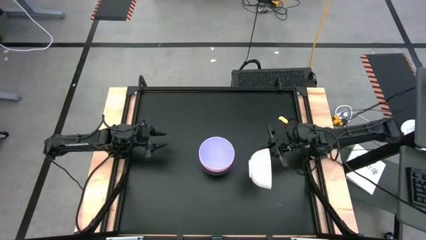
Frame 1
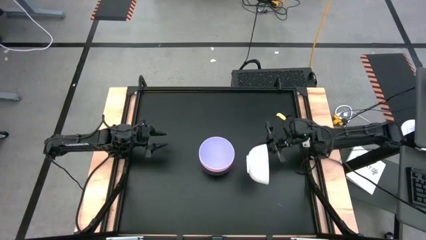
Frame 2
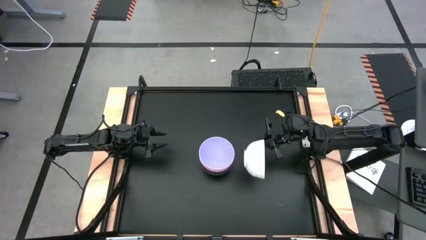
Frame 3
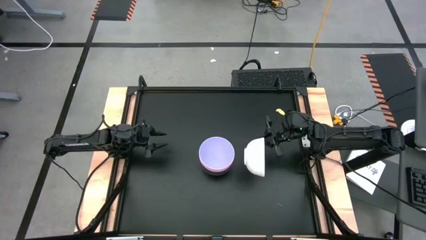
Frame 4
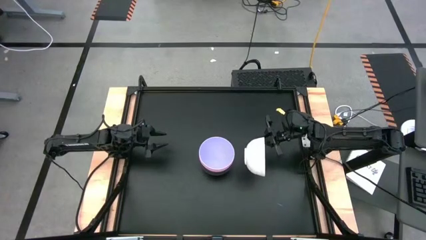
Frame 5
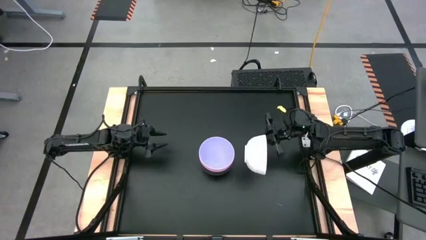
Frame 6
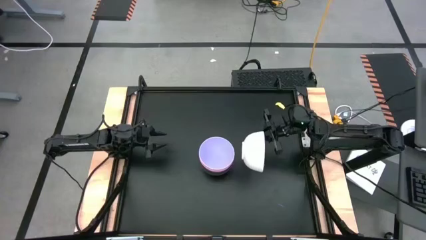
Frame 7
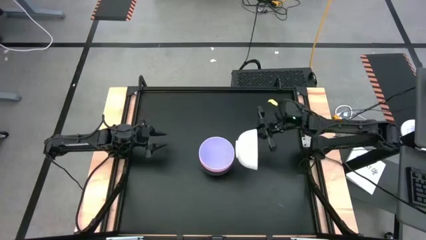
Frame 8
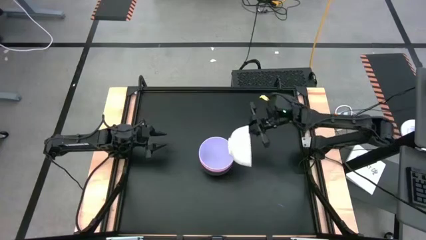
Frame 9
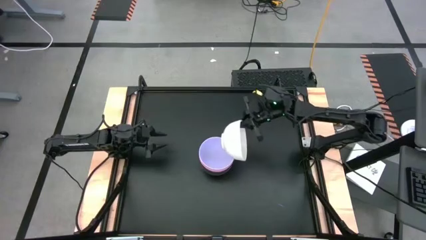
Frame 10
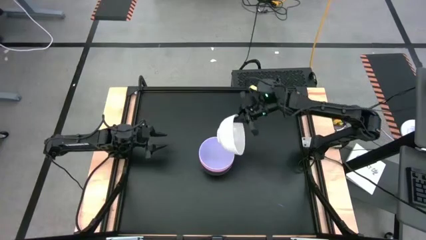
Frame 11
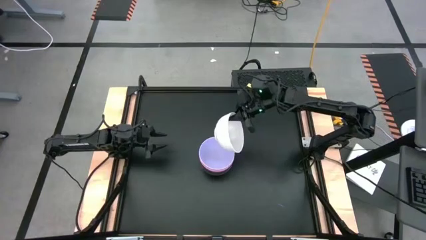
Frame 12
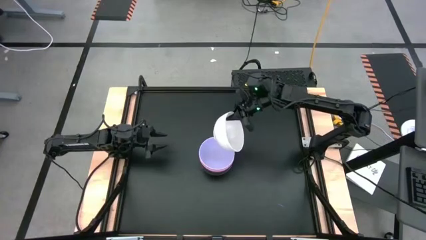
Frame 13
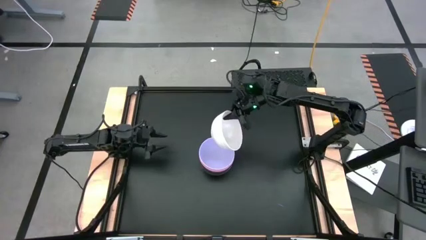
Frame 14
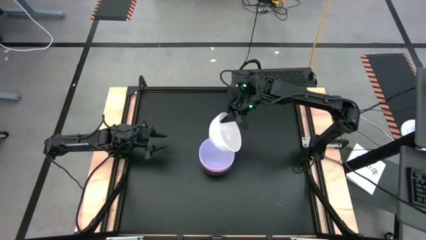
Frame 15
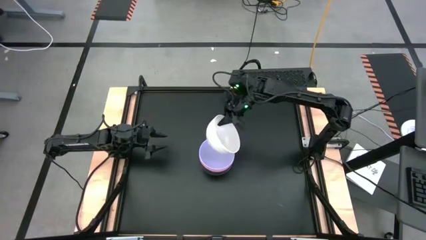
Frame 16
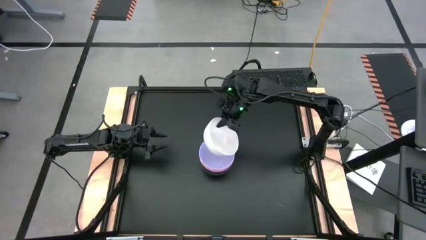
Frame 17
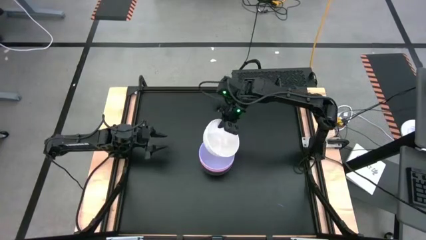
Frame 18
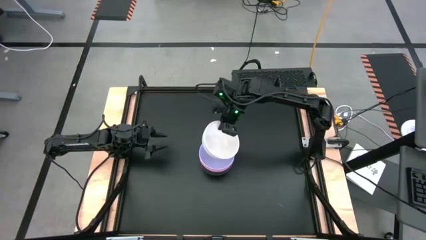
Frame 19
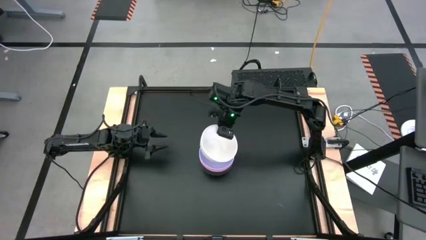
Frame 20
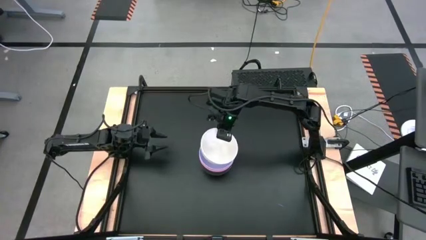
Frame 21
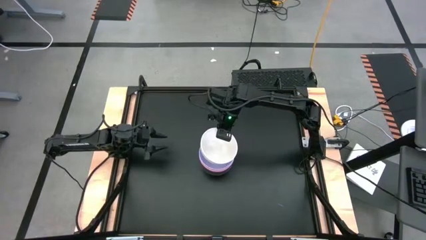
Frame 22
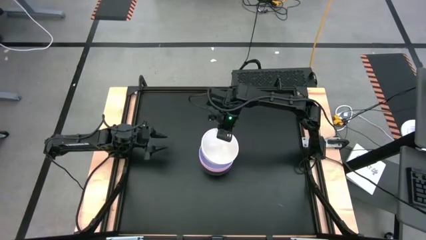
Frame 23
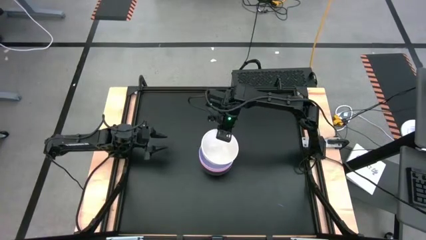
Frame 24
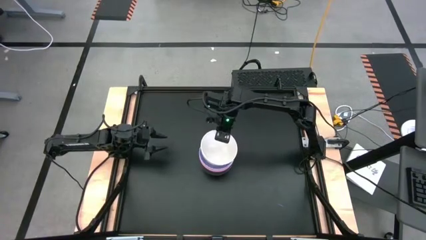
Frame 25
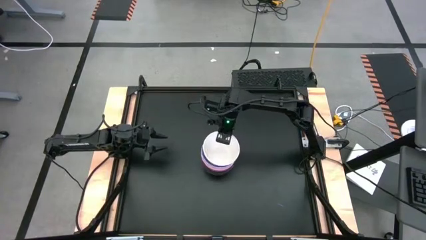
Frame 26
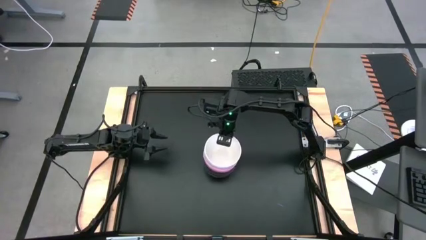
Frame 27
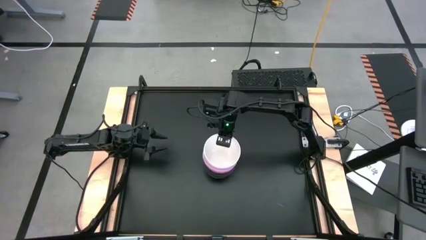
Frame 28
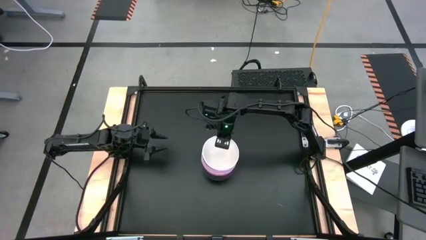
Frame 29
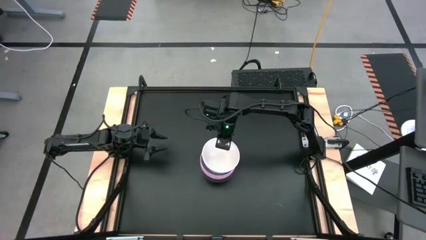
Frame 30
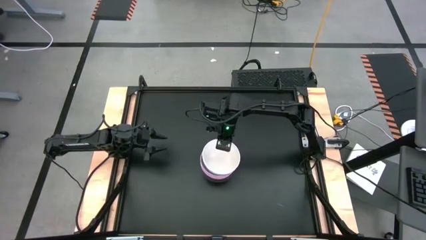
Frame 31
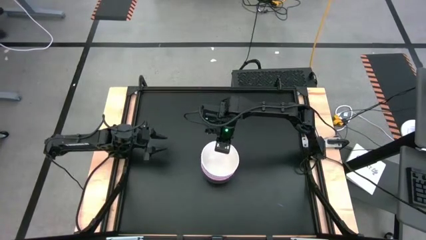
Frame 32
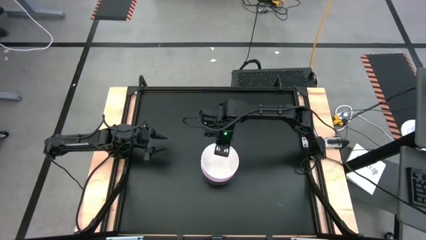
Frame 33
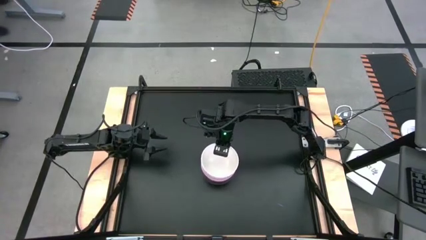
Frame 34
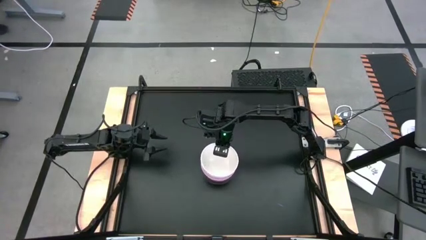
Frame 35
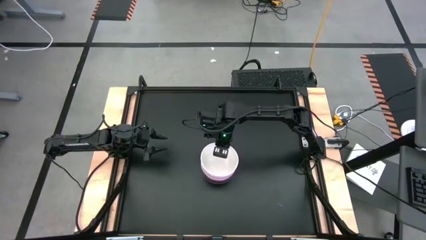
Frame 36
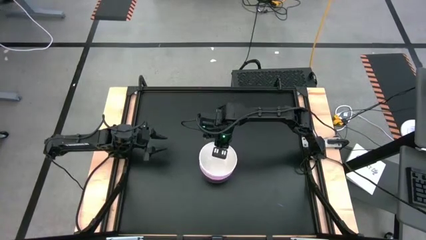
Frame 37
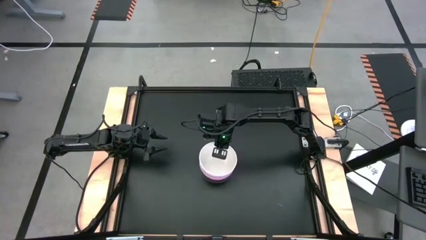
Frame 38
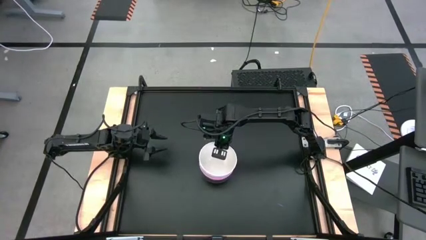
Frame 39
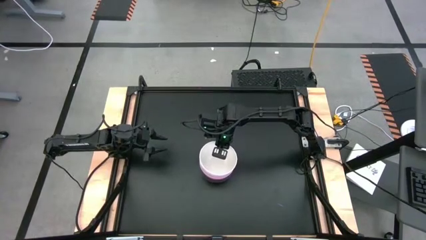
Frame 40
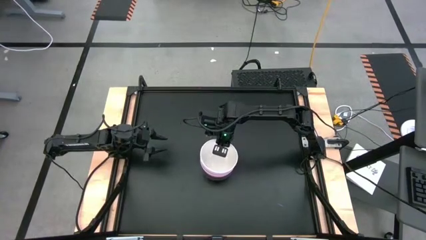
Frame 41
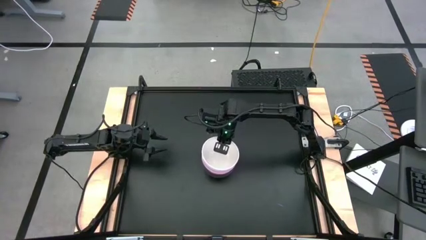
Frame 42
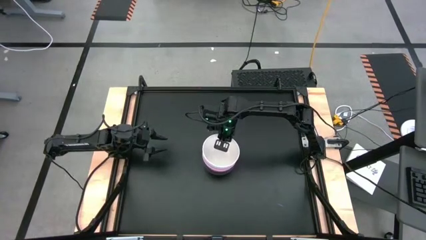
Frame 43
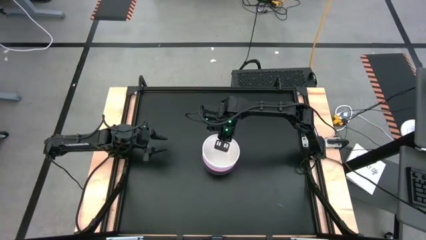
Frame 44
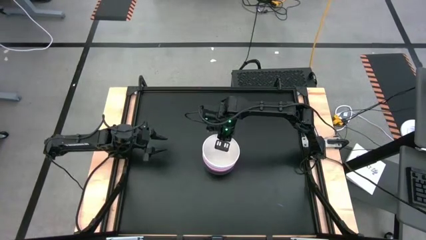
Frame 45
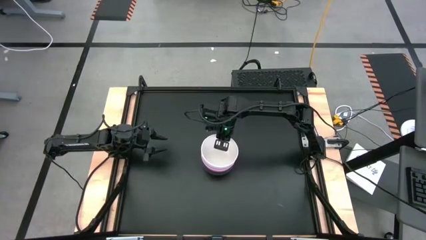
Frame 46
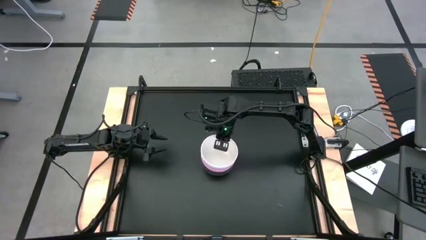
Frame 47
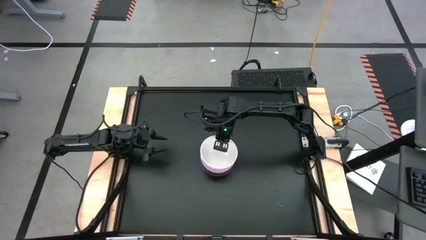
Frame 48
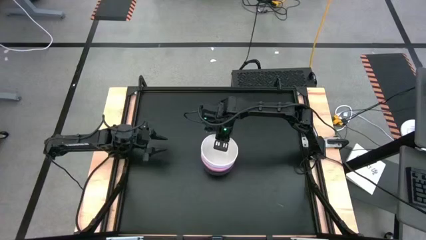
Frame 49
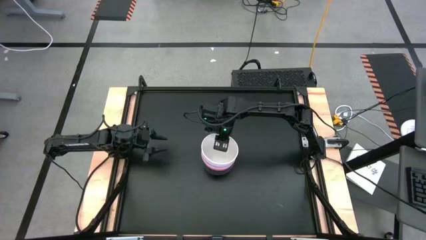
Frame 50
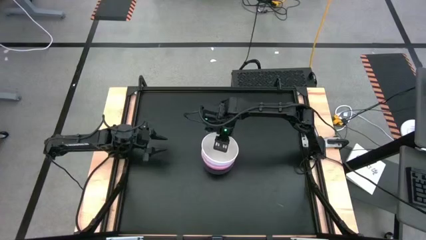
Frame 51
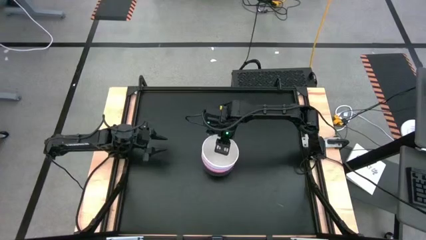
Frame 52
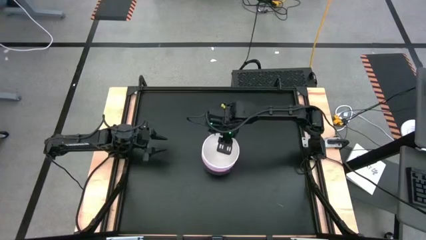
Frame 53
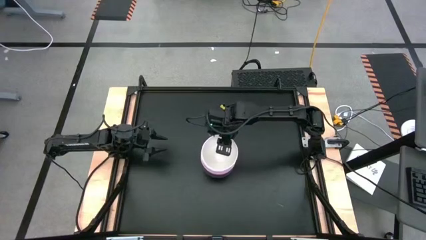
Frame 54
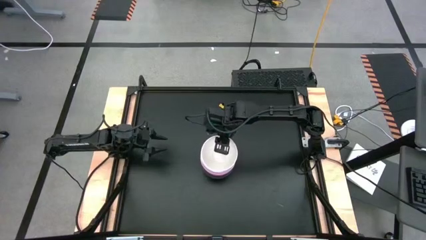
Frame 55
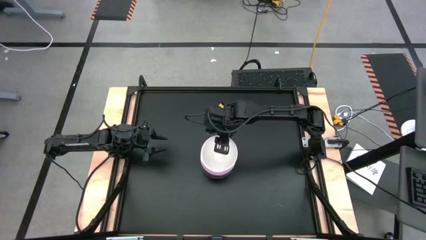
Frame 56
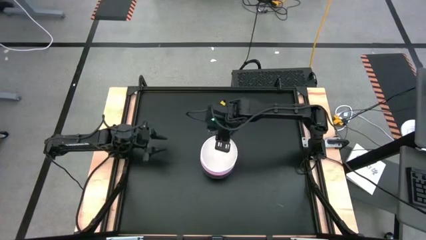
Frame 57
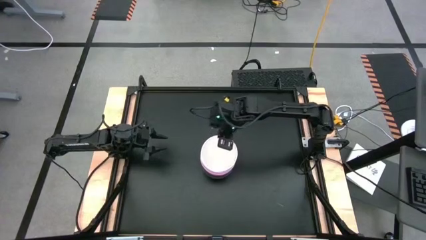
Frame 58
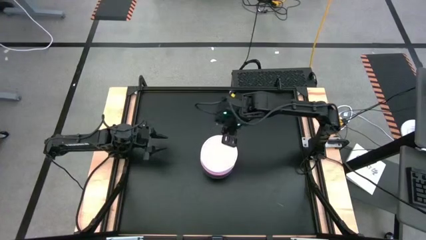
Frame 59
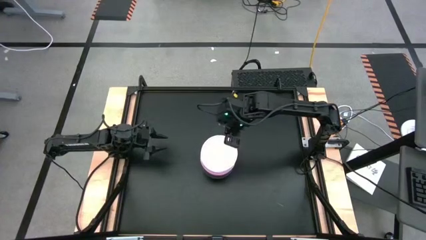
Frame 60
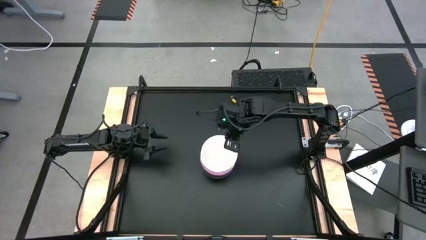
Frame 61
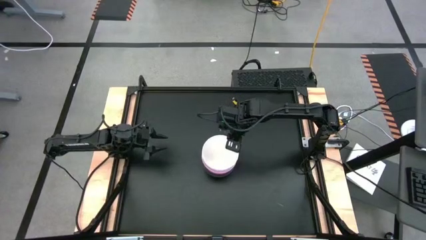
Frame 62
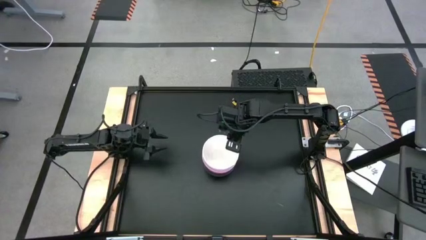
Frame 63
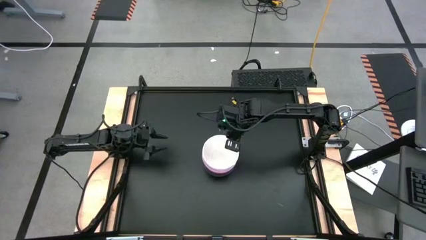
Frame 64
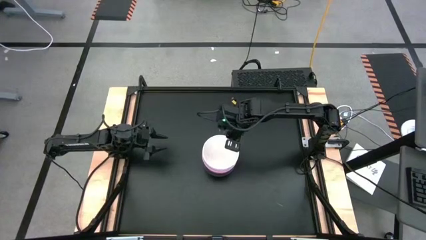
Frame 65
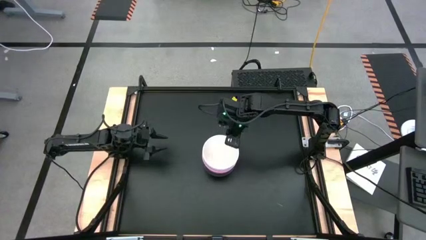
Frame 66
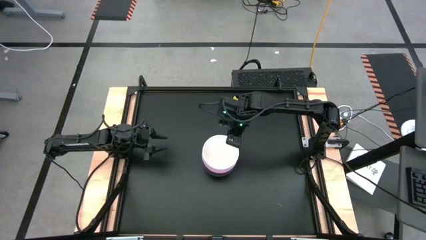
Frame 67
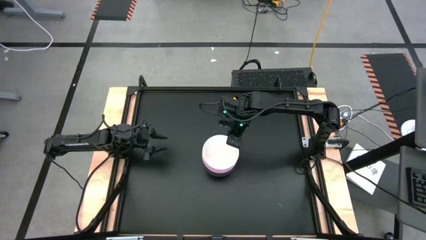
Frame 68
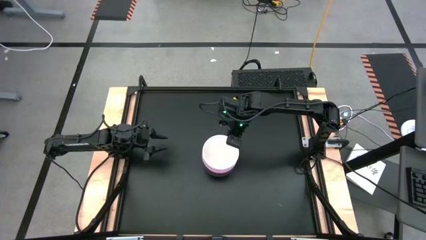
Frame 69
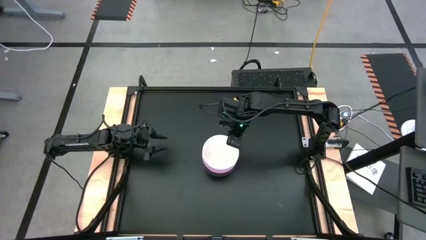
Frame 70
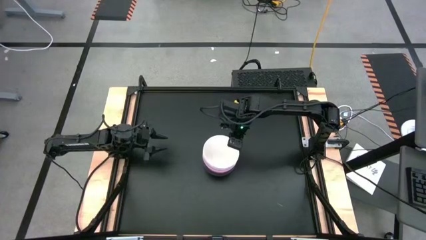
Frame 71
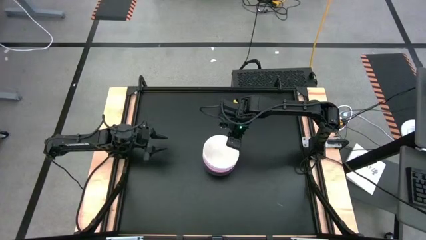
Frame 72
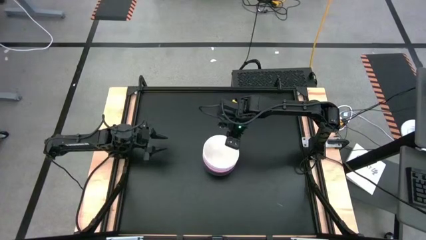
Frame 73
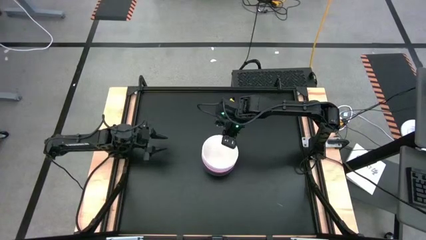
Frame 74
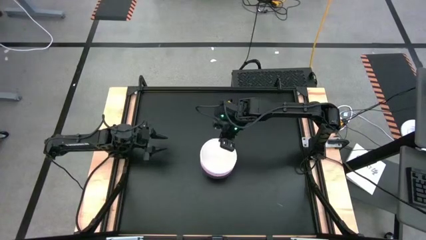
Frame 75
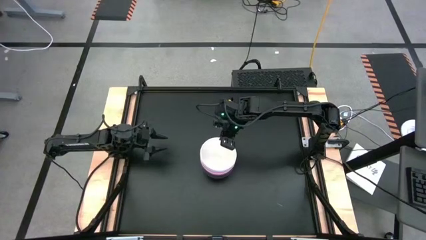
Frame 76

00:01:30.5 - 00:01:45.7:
Task: Nest bowls inside each other
Stack the white bowl on top of the purple bowl
